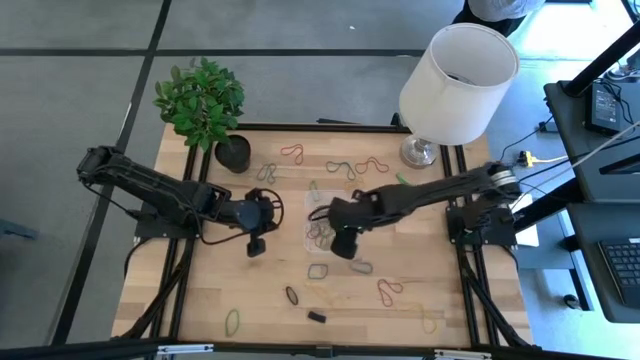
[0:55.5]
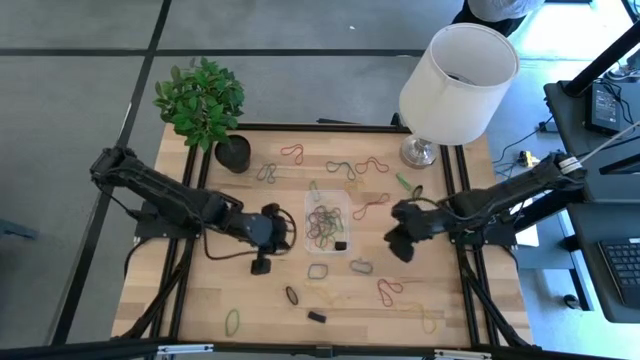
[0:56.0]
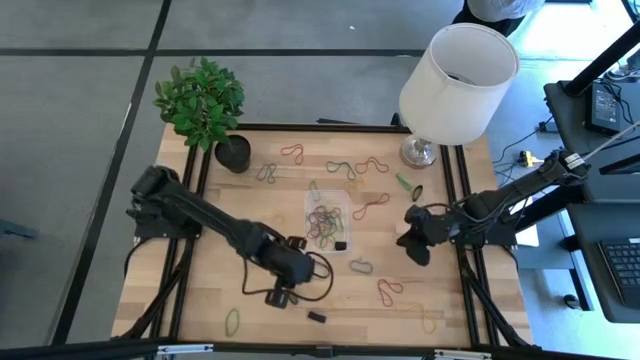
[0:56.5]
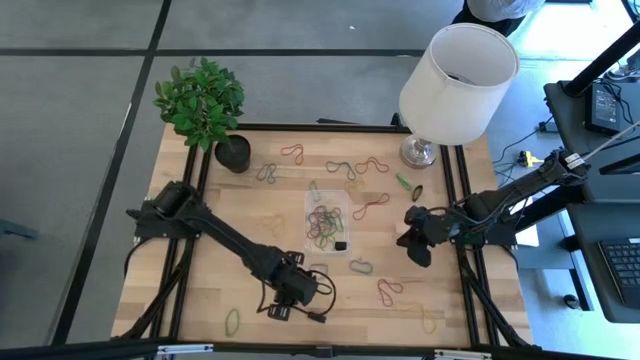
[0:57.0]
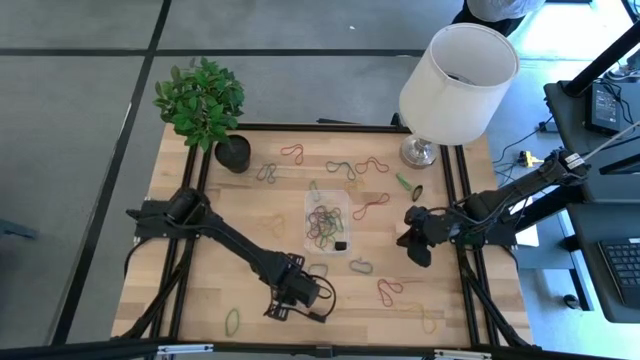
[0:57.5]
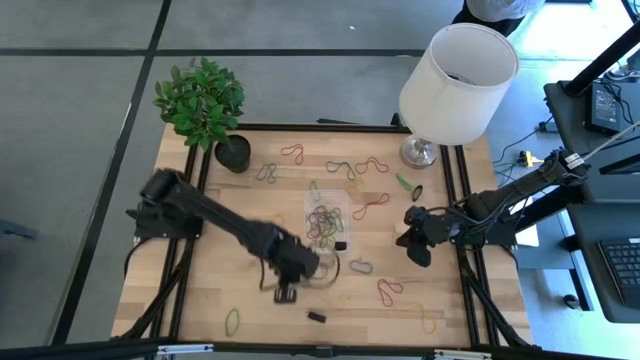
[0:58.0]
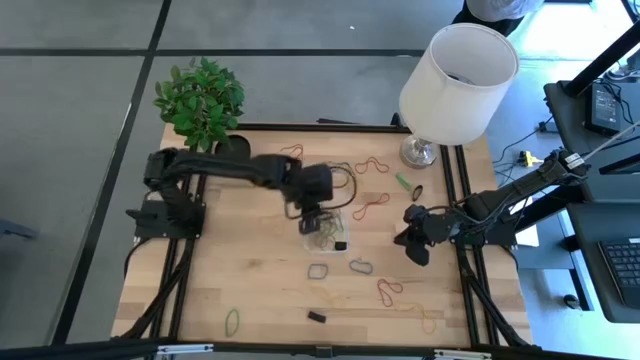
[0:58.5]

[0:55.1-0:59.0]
Task: Pick and place rubber bands into bin
Put the black rubber band into the transparent container

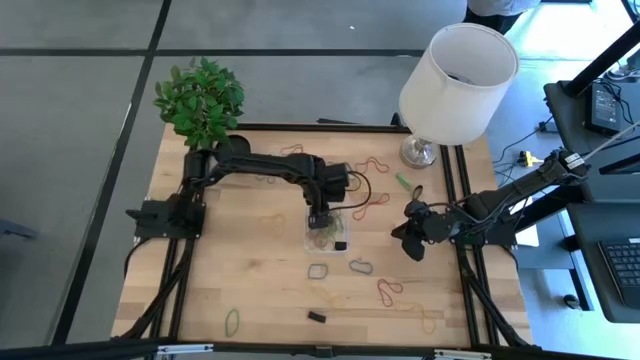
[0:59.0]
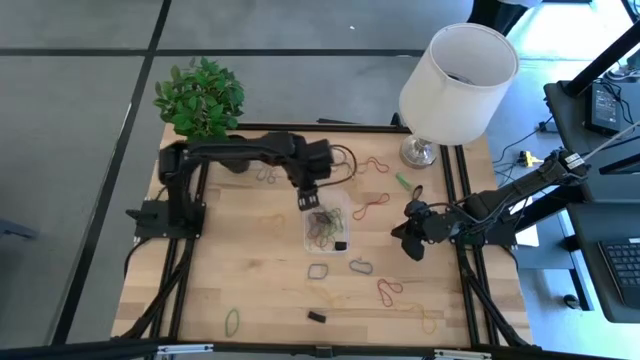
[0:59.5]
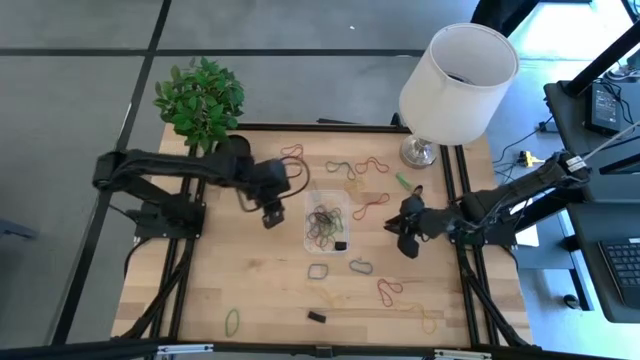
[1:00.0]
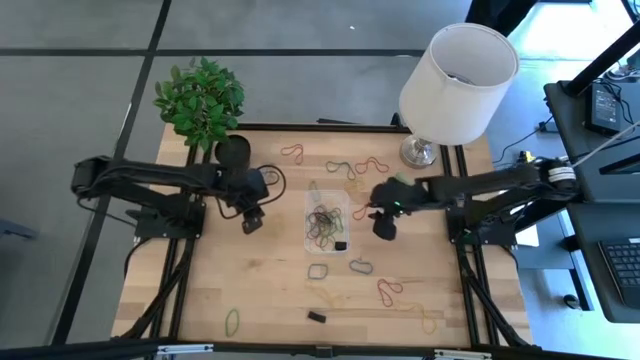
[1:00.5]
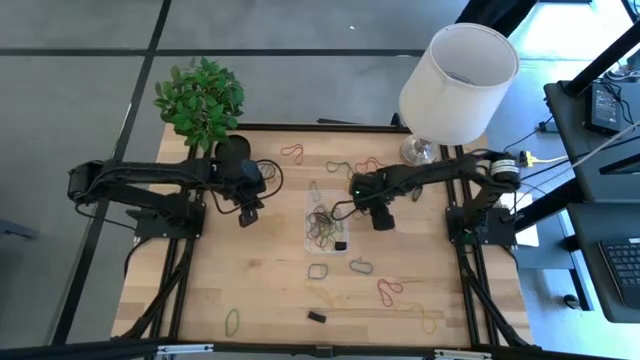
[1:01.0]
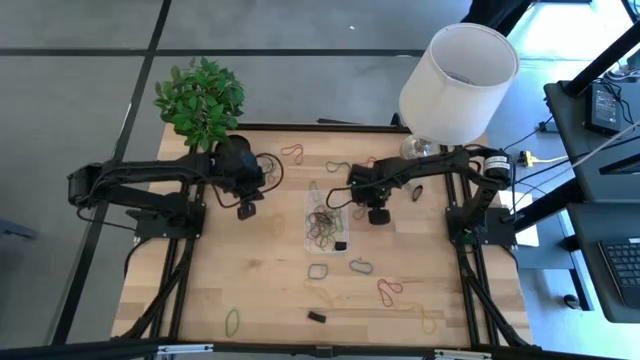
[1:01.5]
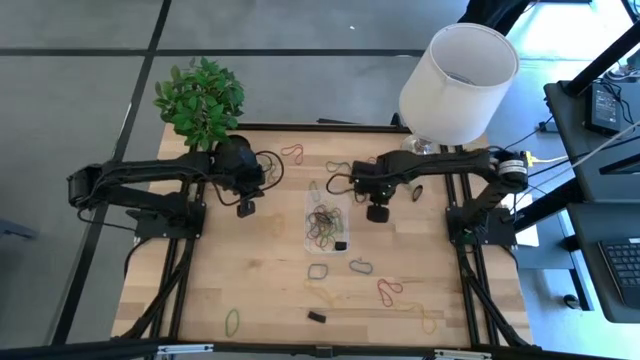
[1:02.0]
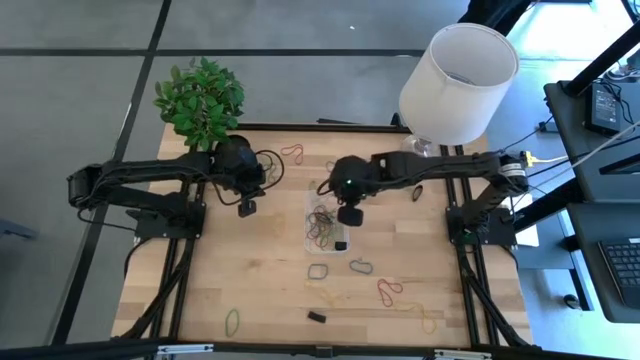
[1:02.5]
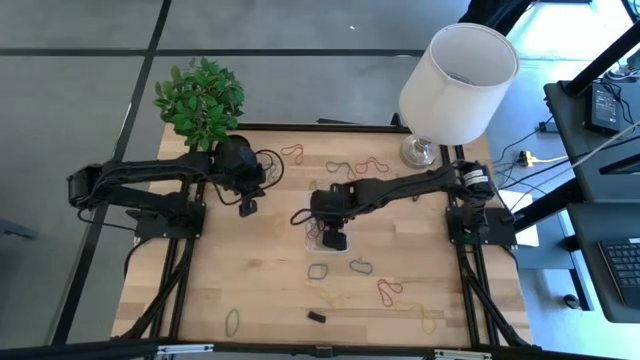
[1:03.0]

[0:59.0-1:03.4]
Put the red rubber band into the transparent container

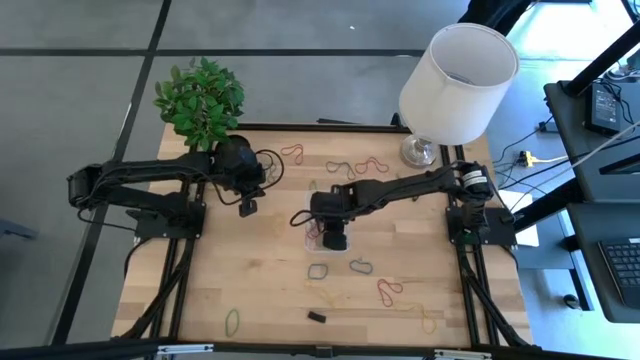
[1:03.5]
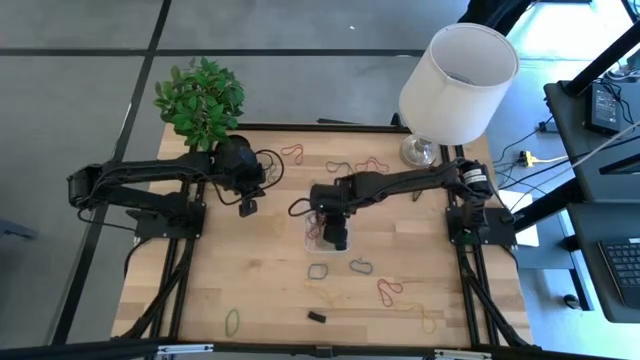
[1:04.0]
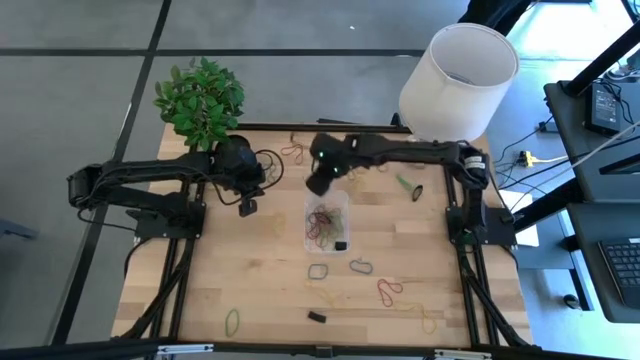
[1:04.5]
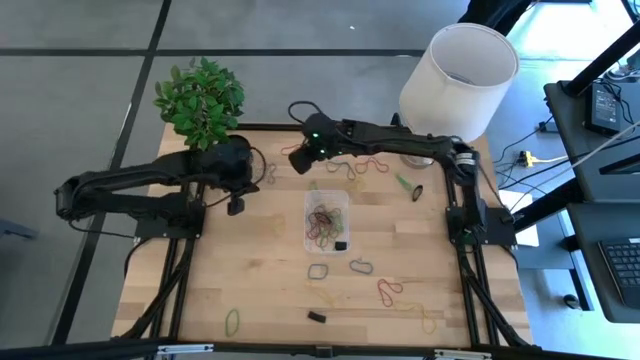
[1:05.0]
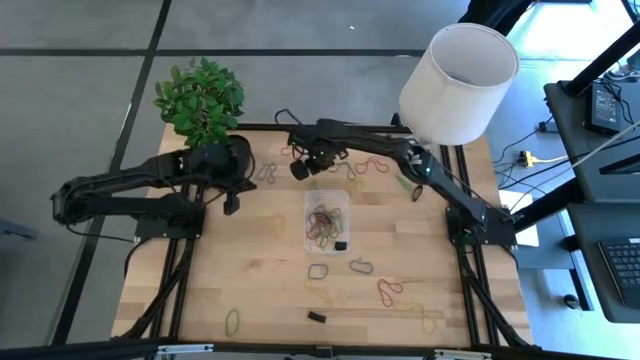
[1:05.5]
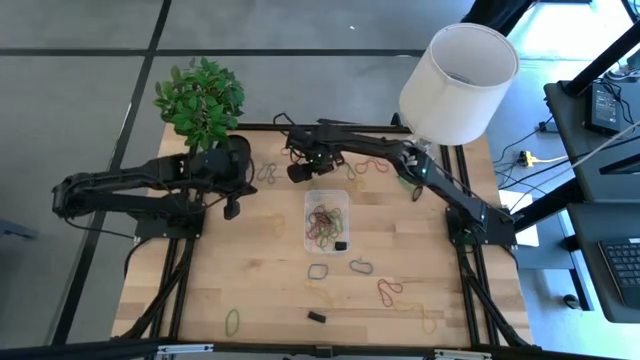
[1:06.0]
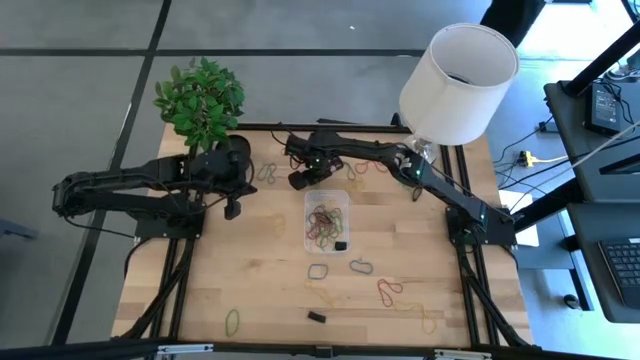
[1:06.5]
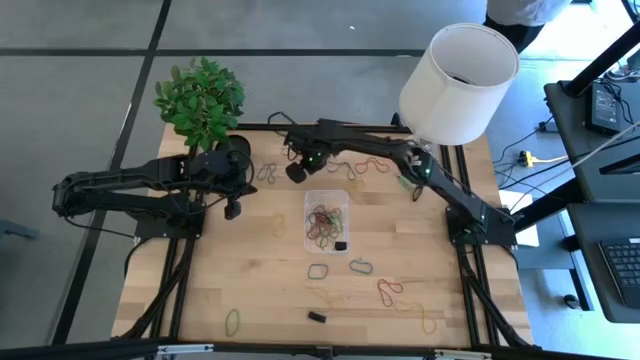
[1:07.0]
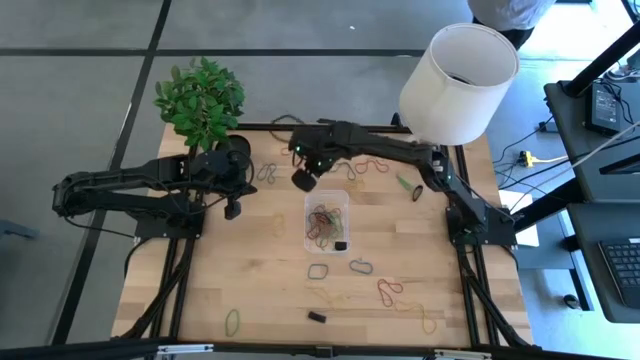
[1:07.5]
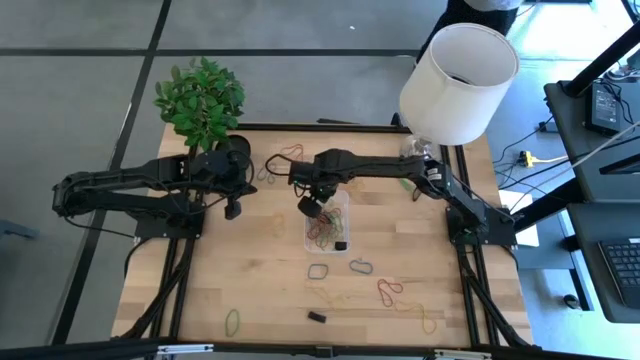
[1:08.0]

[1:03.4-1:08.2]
Put the green rubber band into the transparent container

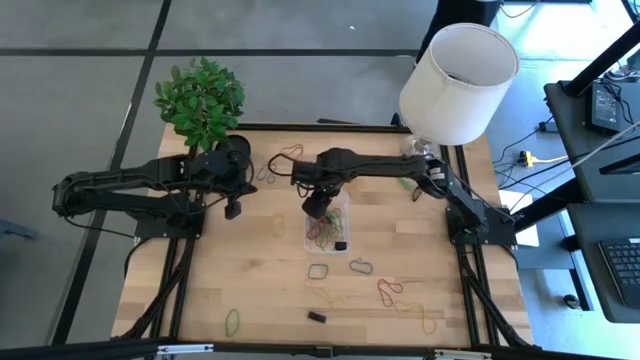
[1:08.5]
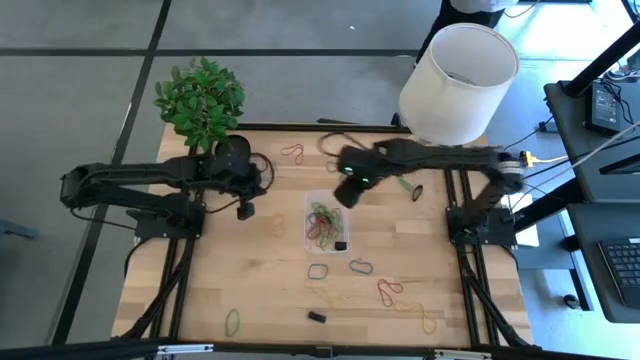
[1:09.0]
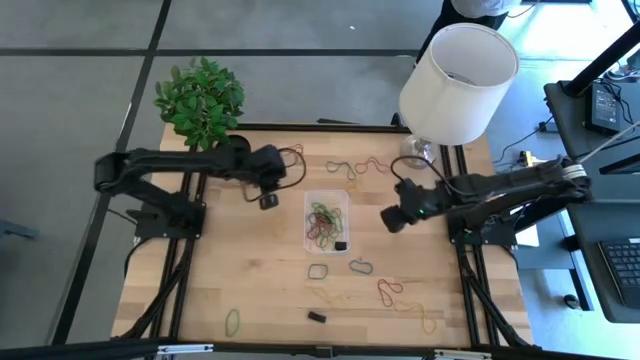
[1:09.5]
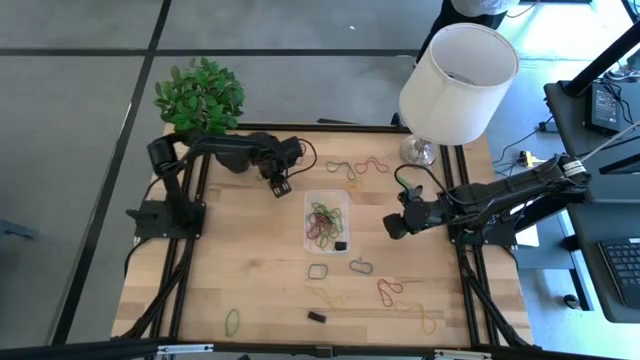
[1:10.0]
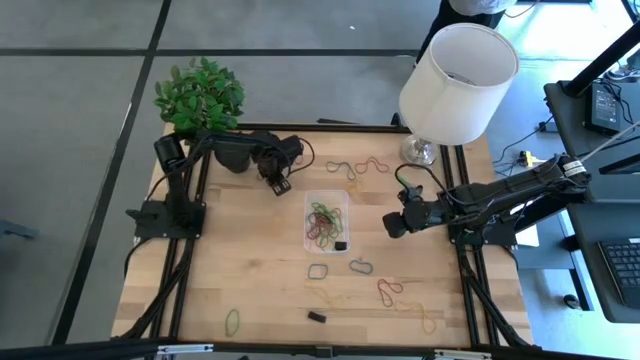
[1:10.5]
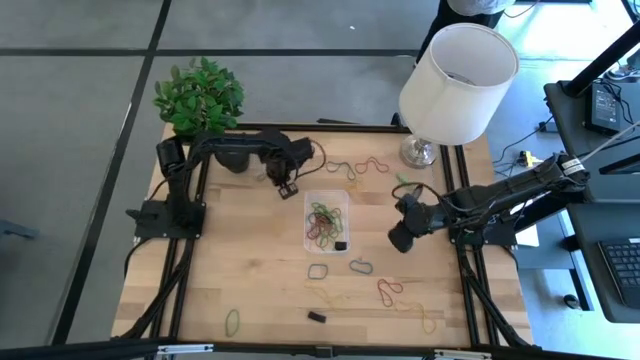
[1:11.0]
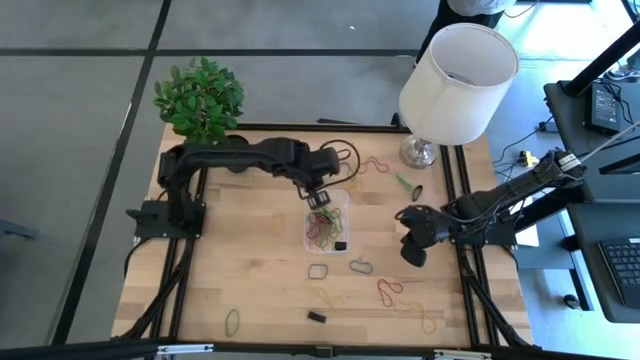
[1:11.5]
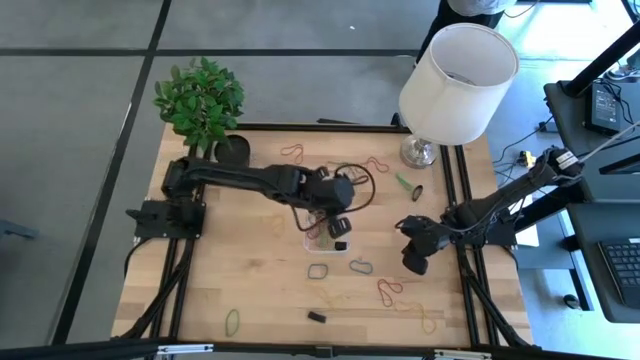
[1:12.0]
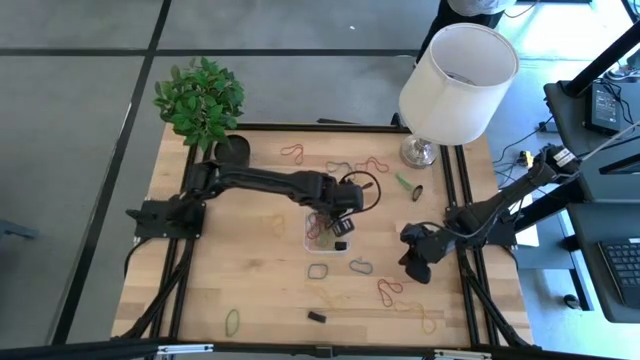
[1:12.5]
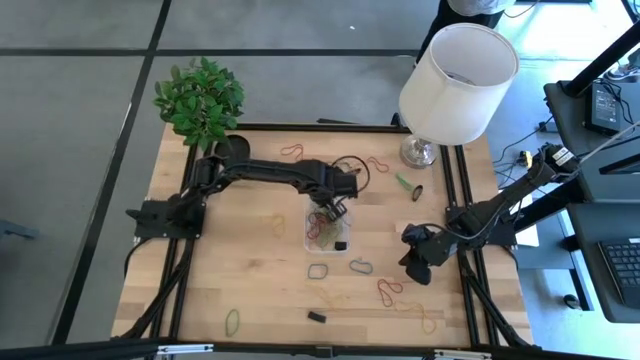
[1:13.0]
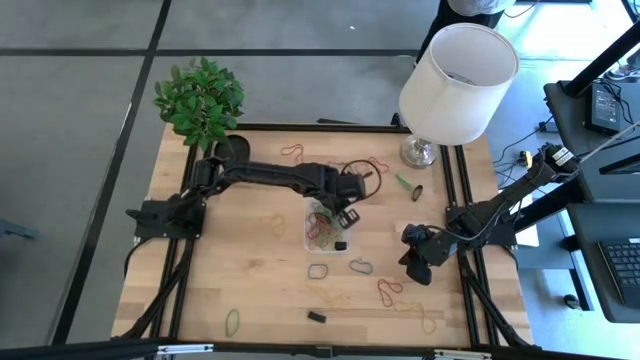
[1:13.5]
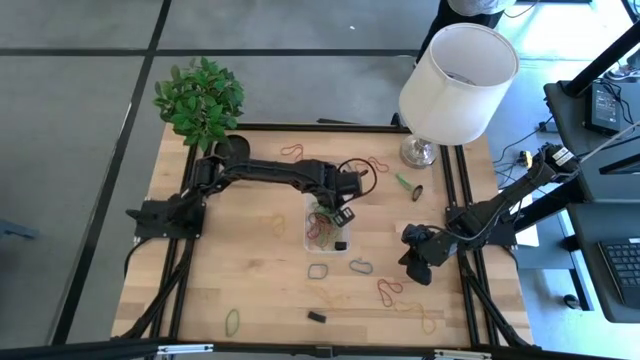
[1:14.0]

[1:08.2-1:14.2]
Put the blue rubber band into the transparent container

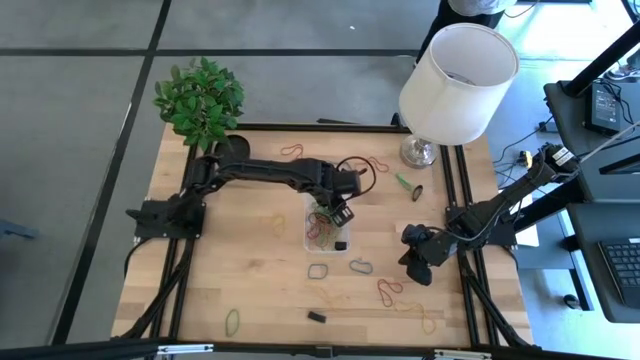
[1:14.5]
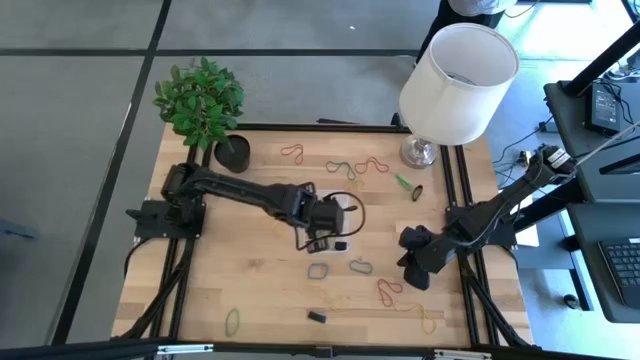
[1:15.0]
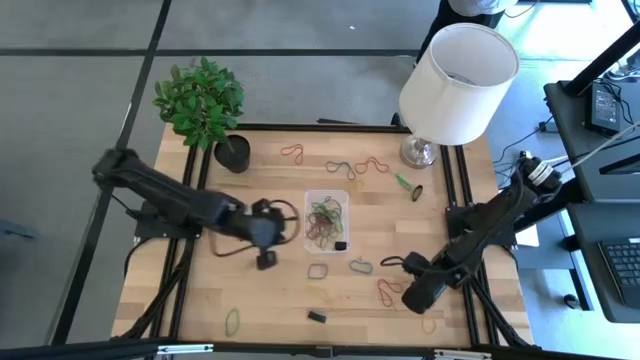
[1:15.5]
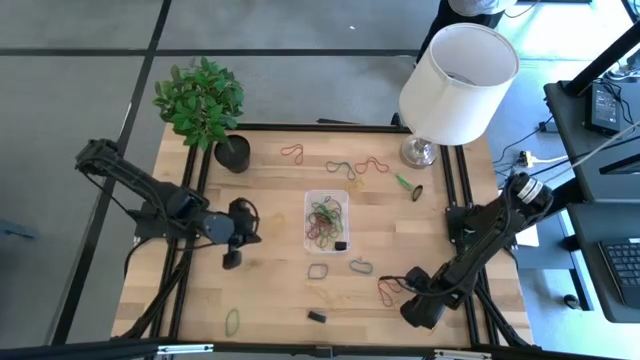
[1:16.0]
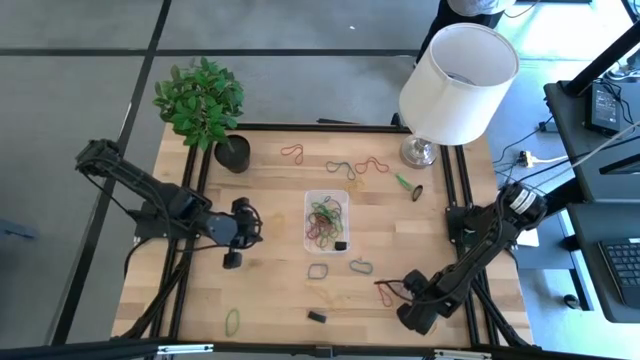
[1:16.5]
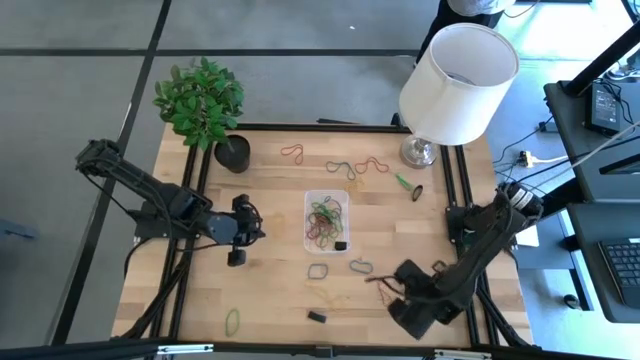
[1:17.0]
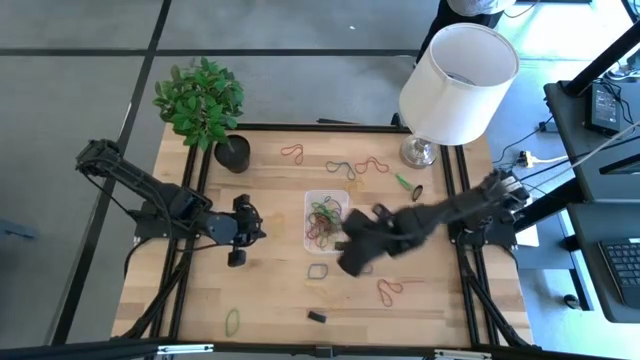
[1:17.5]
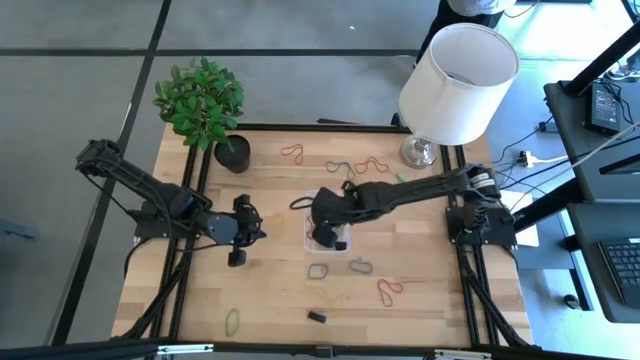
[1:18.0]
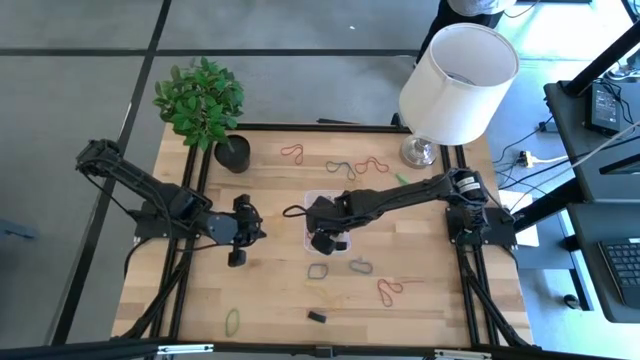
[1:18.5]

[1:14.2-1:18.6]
Put the yellow rubber band into the transparent container
